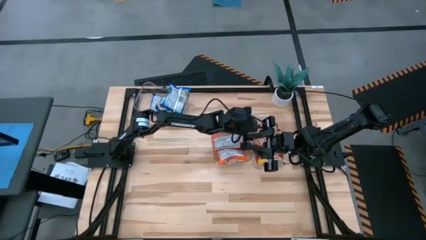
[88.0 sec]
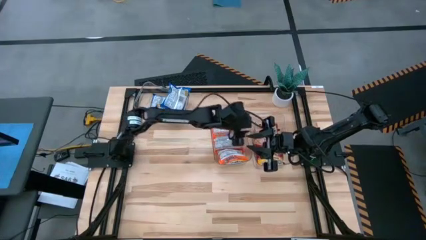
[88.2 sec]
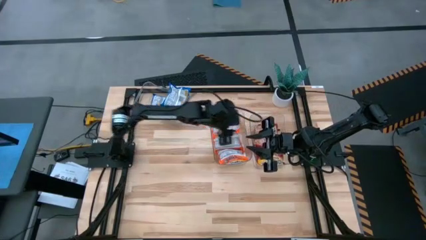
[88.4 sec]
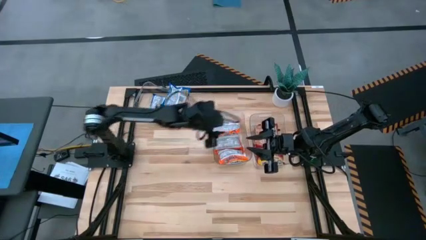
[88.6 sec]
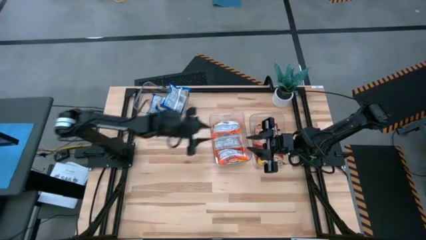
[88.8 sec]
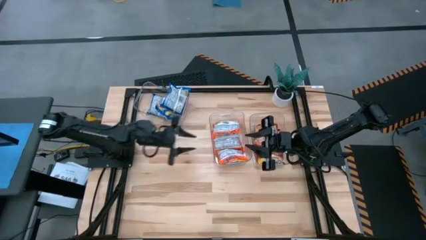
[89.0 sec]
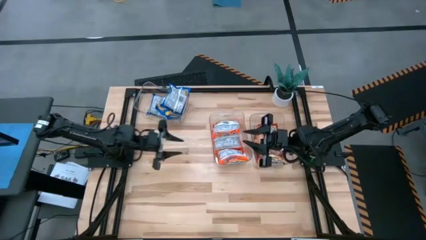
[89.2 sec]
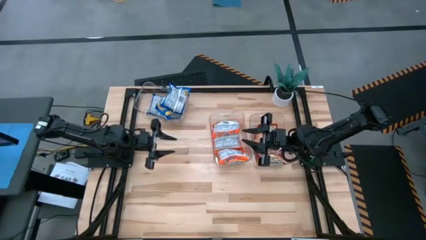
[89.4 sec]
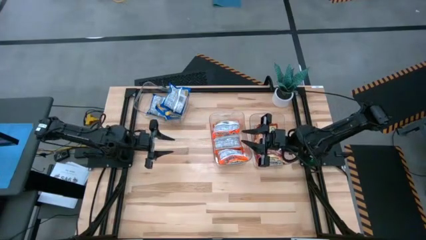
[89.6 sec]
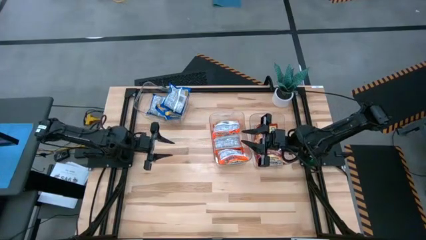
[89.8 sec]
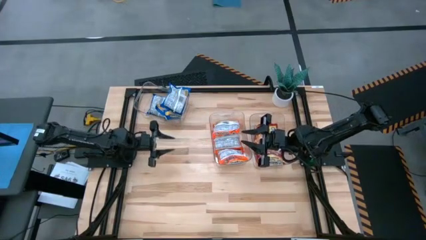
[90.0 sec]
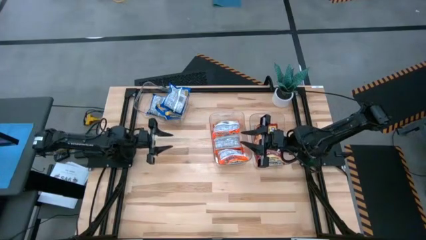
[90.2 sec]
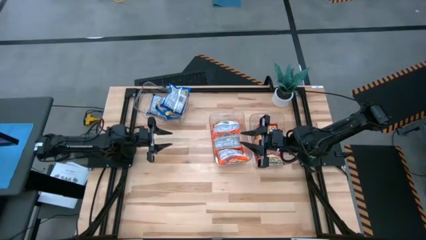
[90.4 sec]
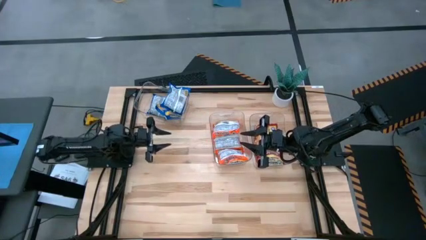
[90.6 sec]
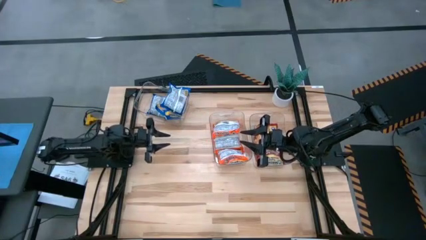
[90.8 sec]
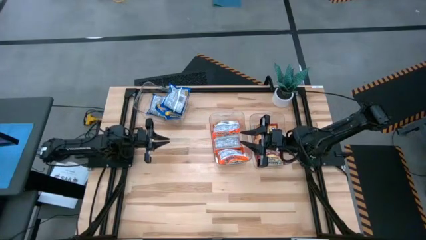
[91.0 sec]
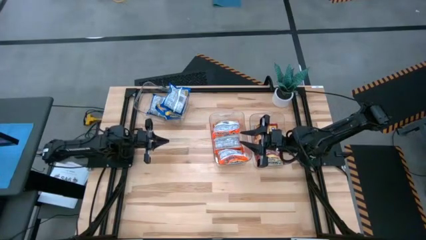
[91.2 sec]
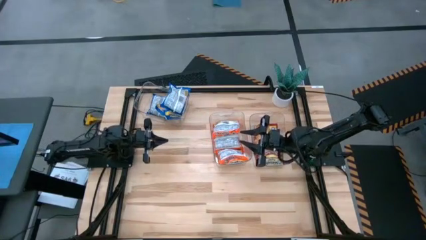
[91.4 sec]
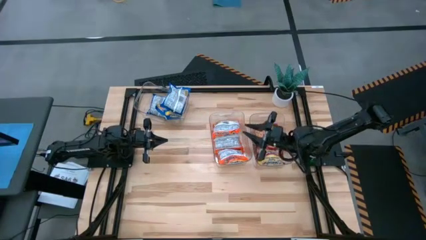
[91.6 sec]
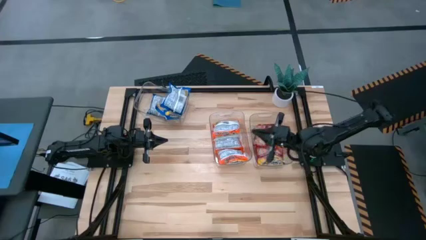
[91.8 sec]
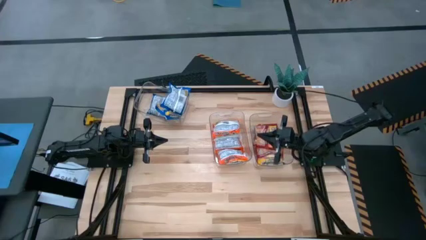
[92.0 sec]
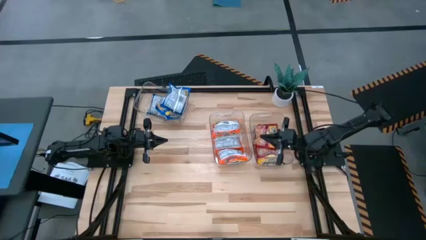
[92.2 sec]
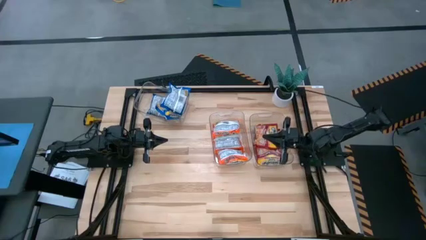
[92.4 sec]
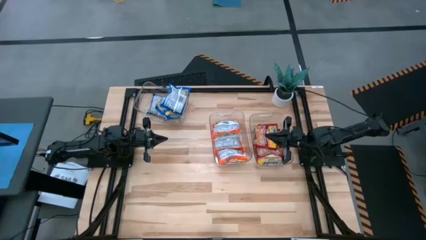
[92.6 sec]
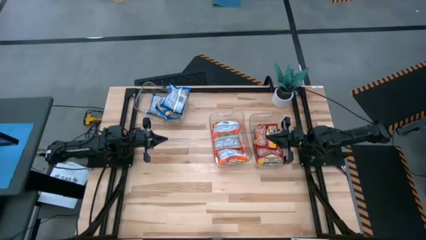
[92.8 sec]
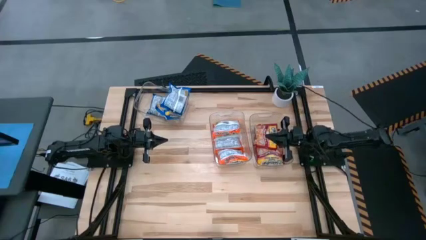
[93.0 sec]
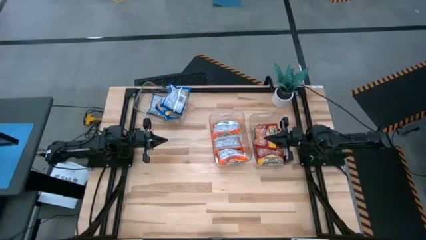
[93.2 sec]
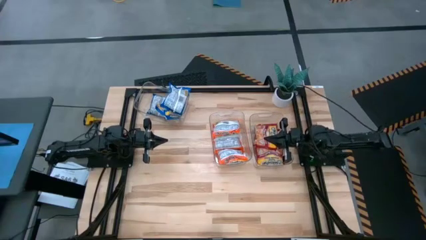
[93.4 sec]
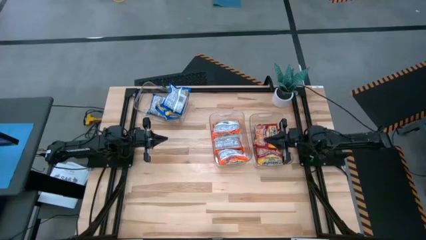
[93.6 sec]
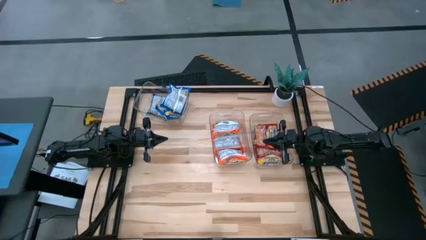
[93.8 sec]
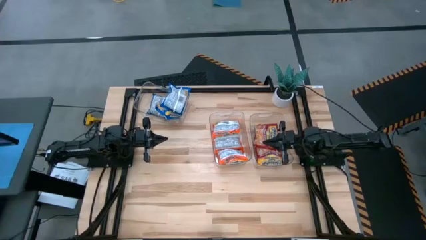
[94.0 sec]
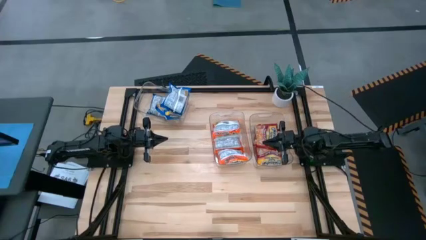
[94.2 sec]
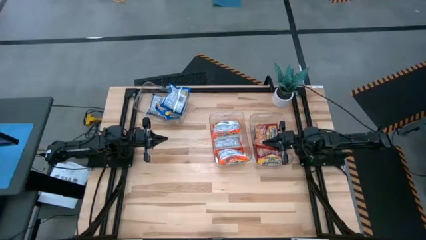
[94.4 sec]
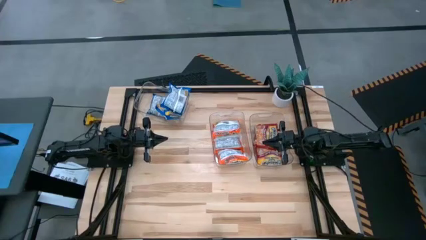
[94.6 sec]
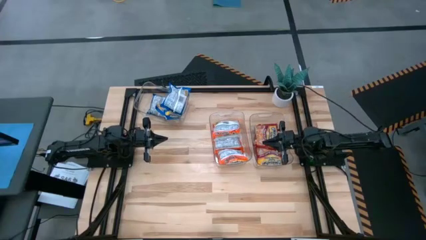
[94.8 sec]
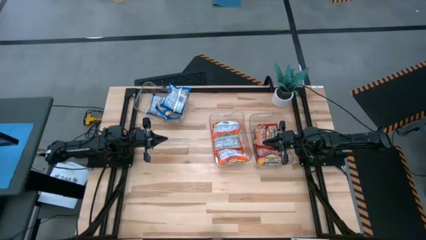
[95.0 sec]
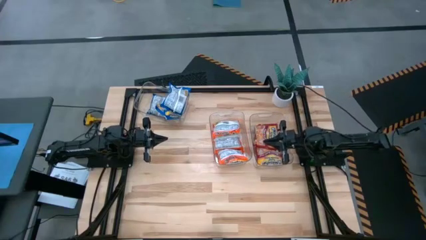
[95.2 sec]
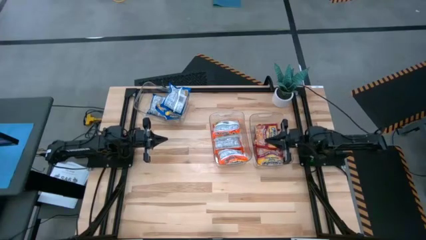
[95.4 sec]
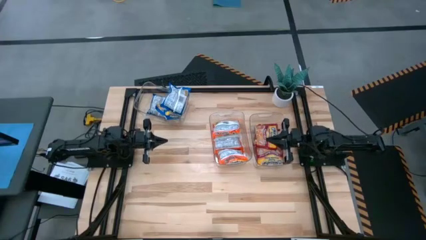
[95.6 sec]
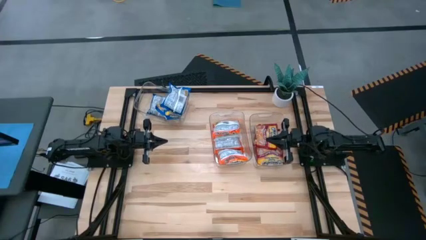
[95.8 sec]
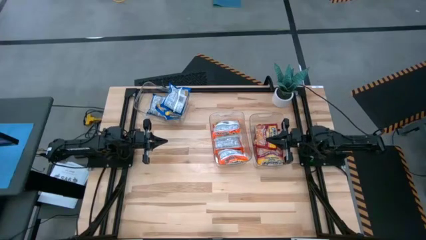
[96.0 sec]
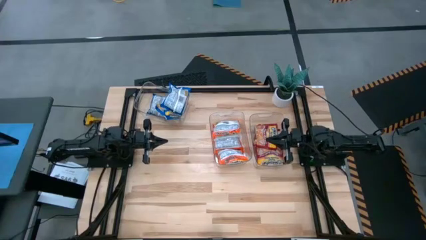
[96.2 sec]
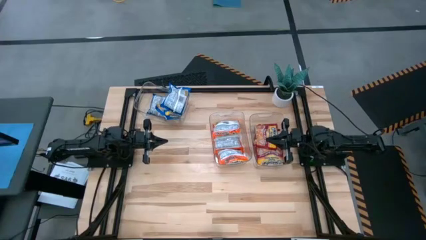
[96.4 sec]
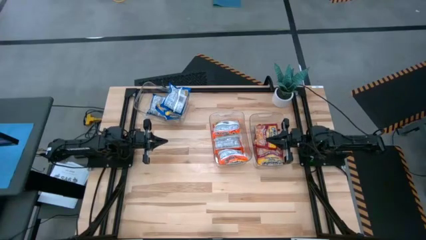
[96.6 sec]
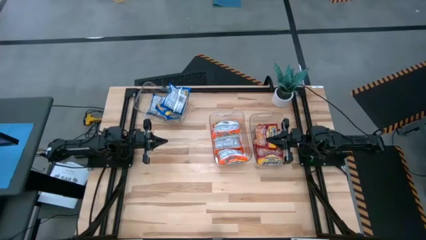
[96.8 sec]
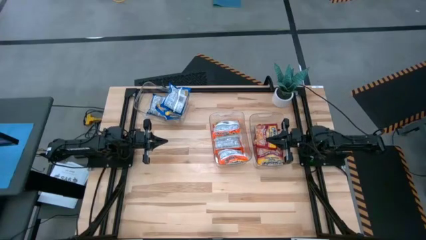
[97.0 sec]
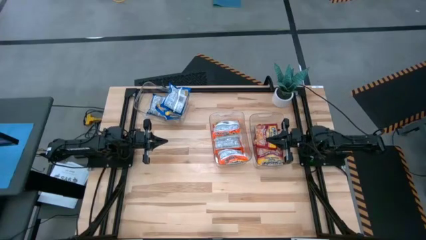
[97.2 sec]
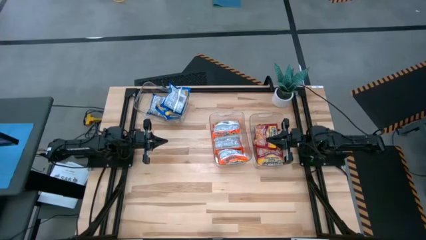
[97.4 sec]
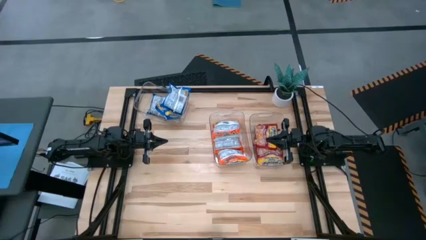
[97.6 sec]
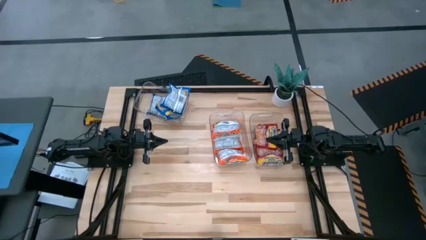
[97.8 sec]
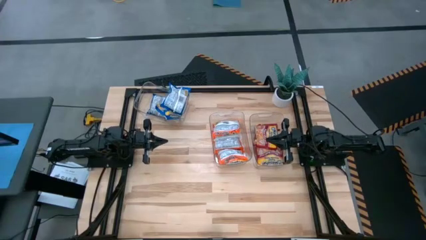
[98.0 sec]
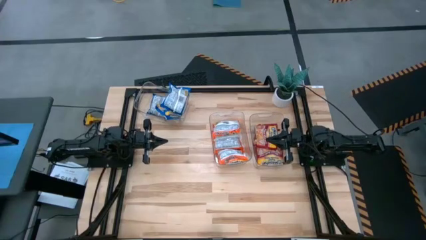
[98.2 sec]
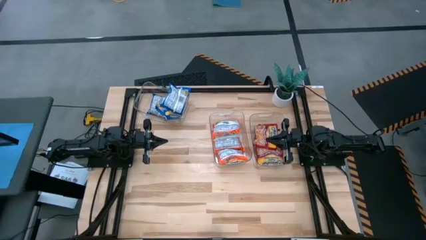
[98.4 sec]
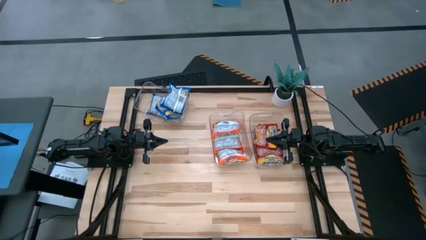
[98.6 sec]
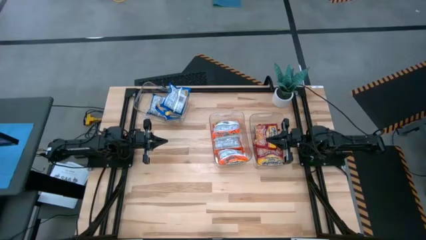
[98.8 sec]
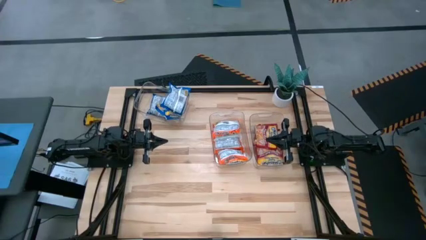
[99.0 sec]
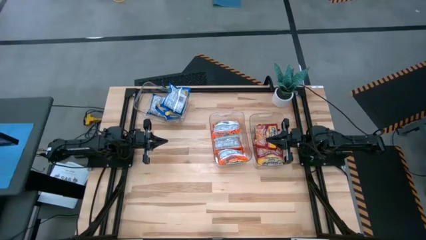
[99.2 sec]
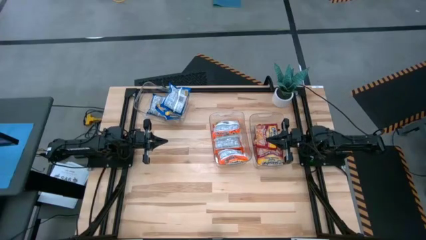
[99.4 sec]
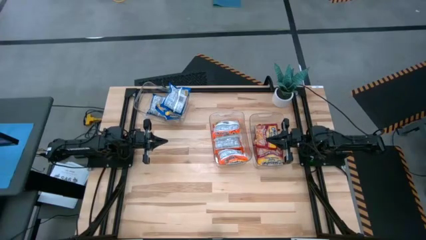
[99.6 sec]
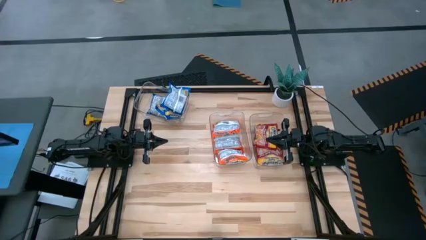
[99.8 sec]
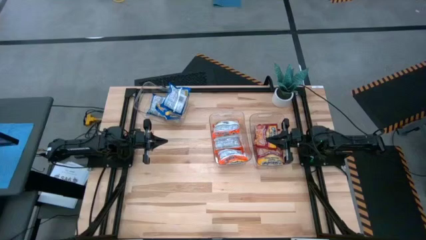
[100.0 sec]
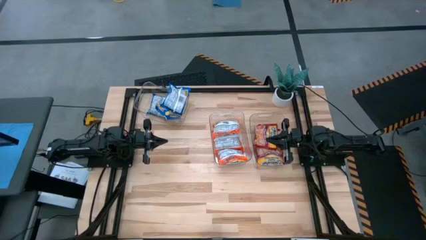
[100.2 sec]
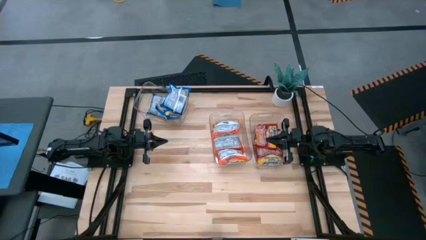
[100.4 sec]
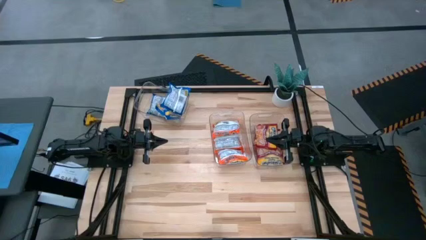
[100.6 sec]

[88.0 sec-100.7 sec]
Task: Sort Maruchan noodles
Return to Home Position
